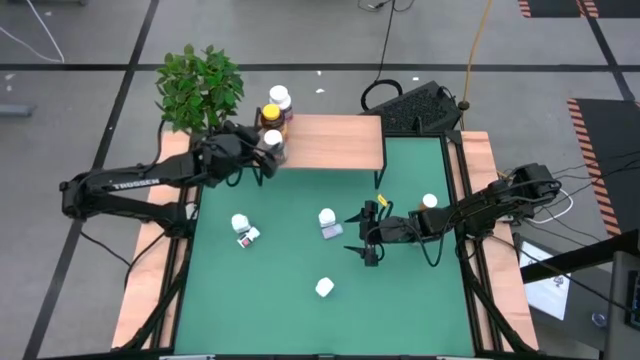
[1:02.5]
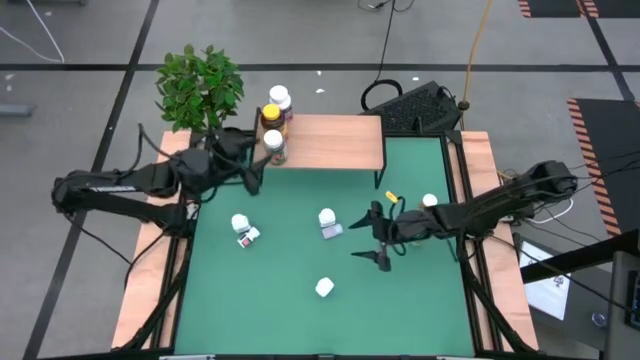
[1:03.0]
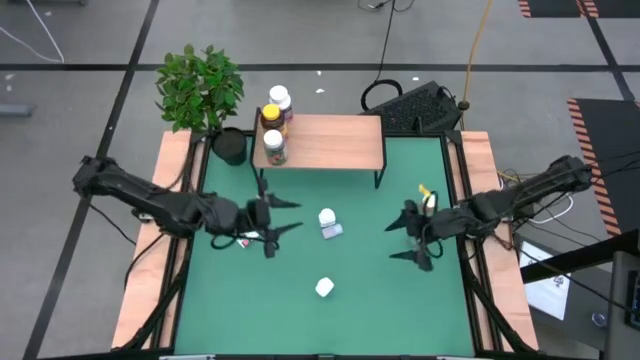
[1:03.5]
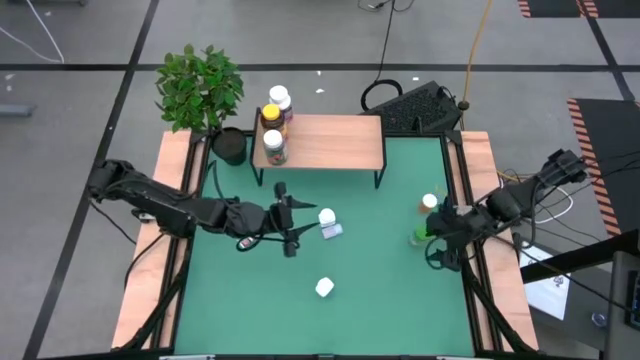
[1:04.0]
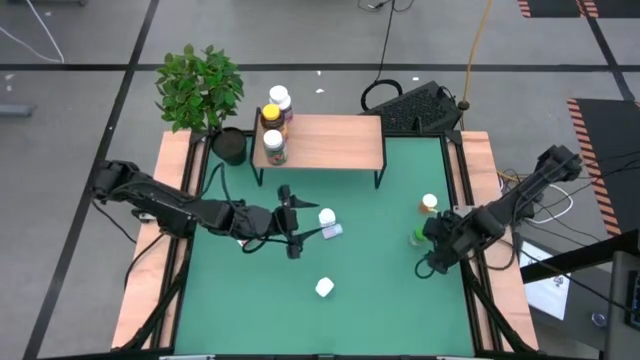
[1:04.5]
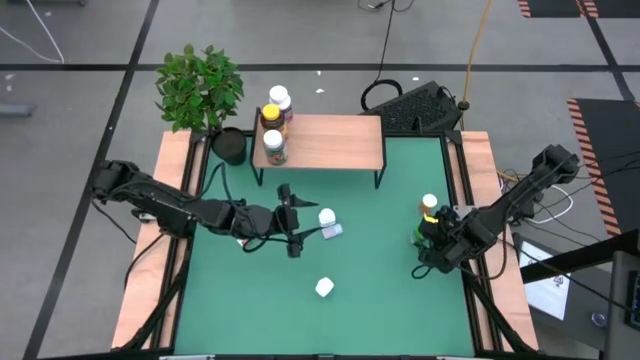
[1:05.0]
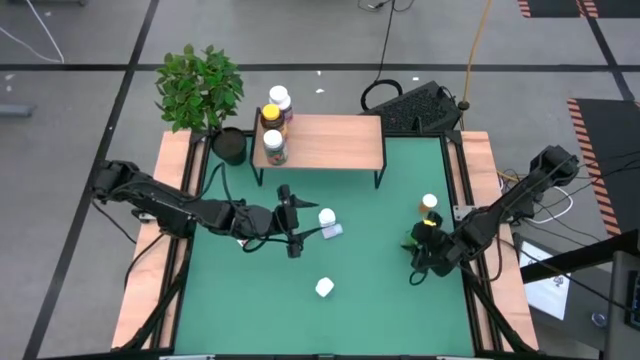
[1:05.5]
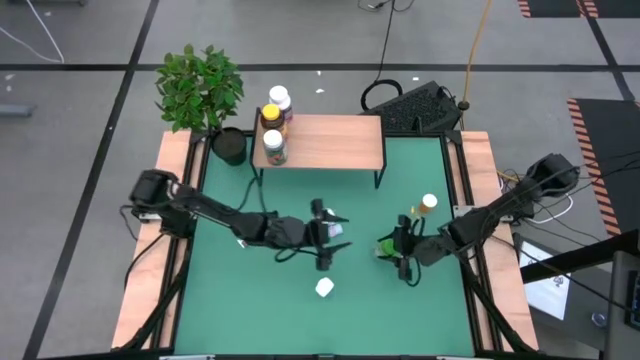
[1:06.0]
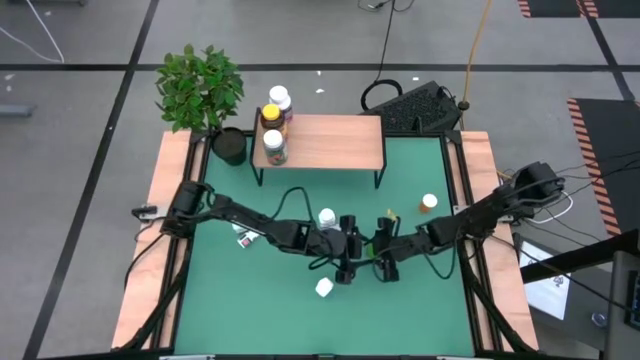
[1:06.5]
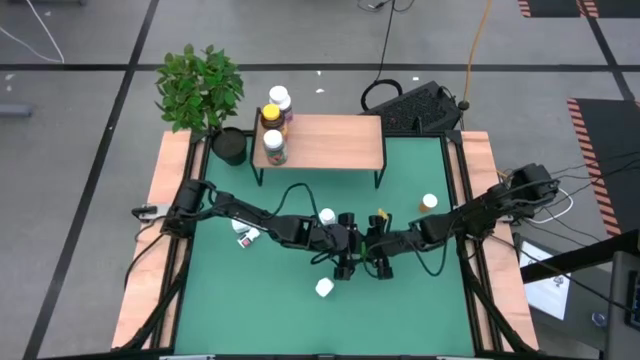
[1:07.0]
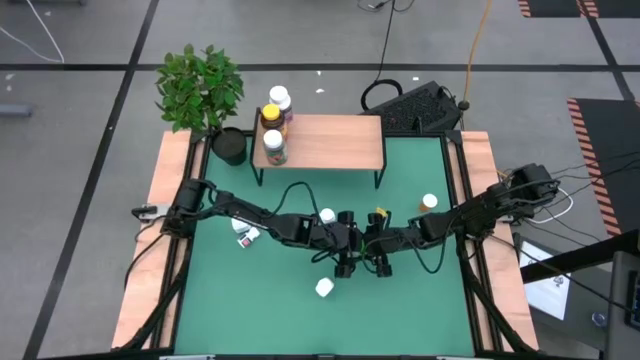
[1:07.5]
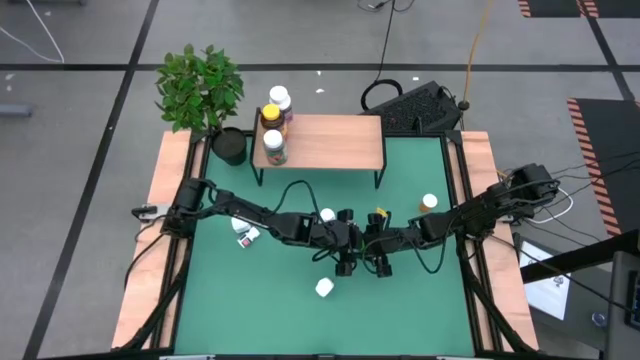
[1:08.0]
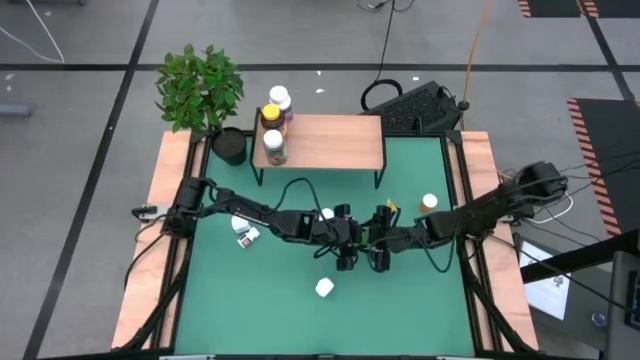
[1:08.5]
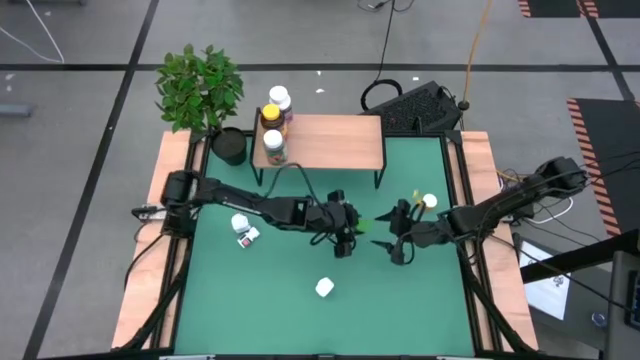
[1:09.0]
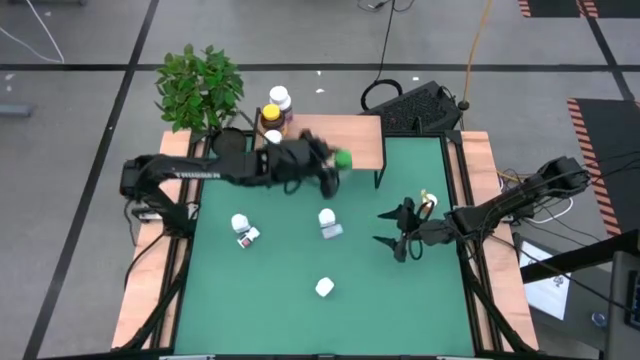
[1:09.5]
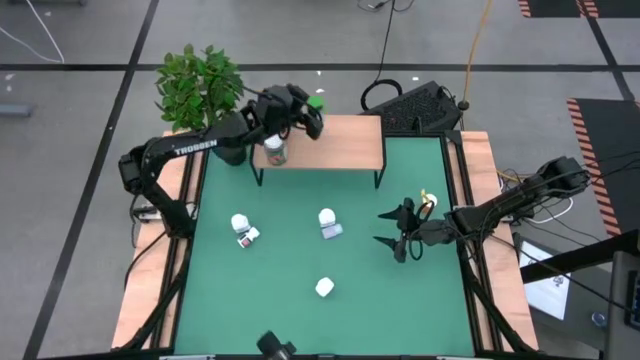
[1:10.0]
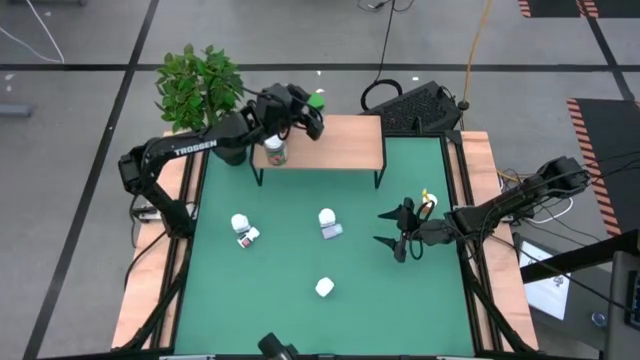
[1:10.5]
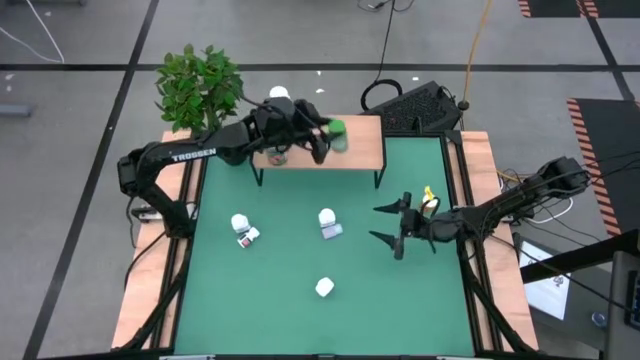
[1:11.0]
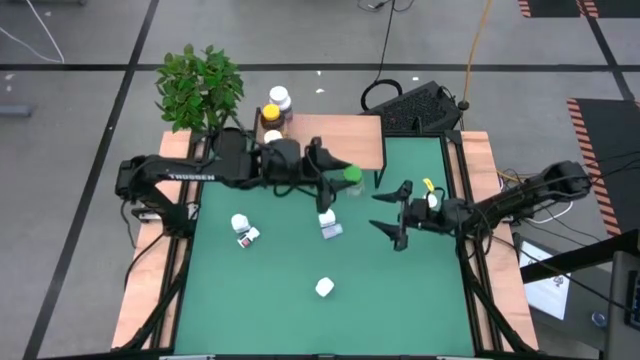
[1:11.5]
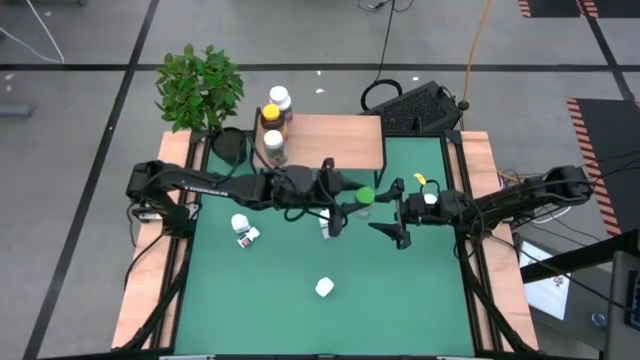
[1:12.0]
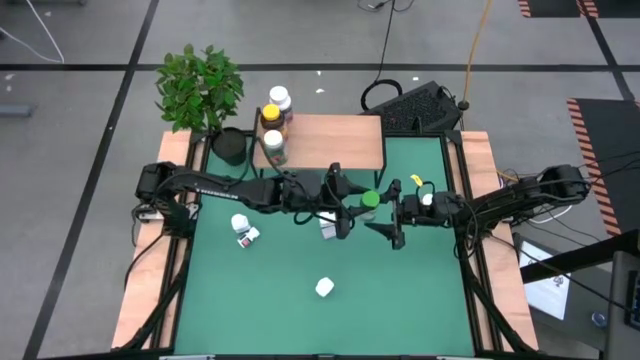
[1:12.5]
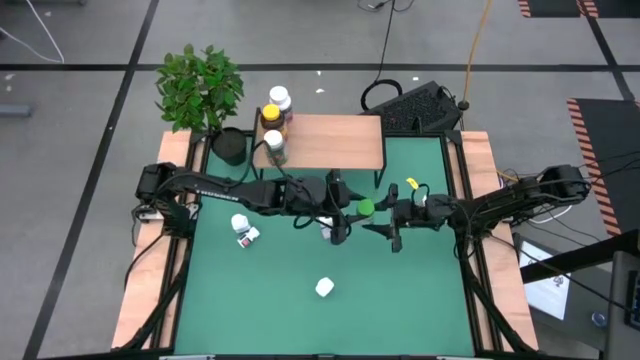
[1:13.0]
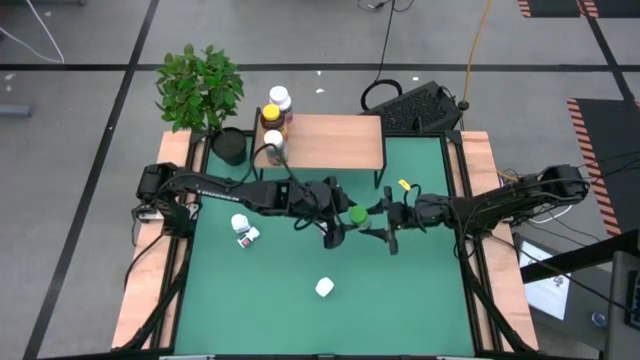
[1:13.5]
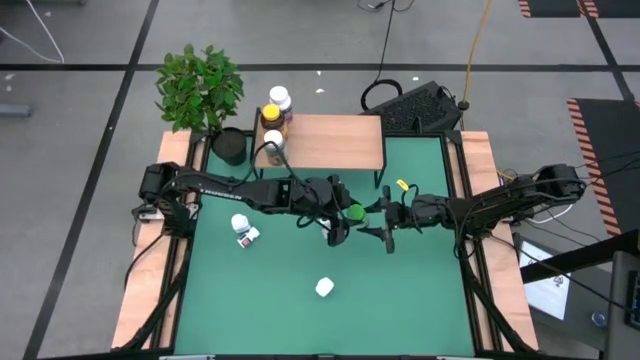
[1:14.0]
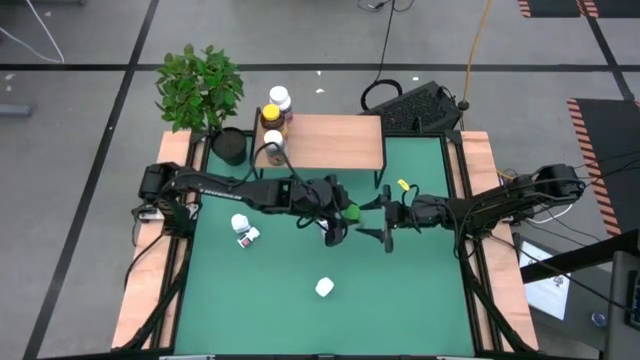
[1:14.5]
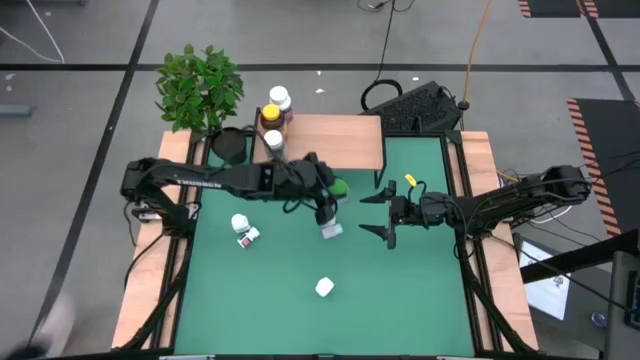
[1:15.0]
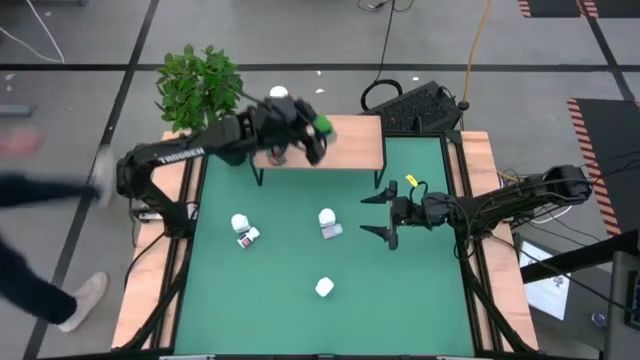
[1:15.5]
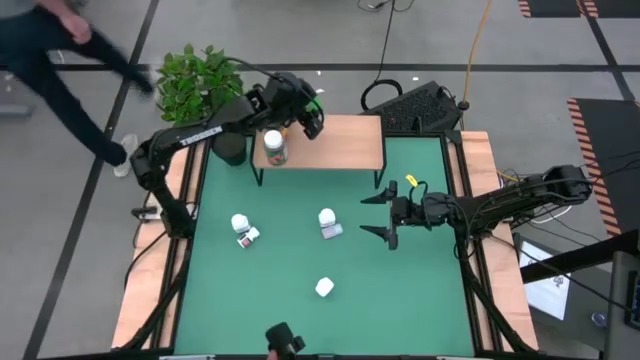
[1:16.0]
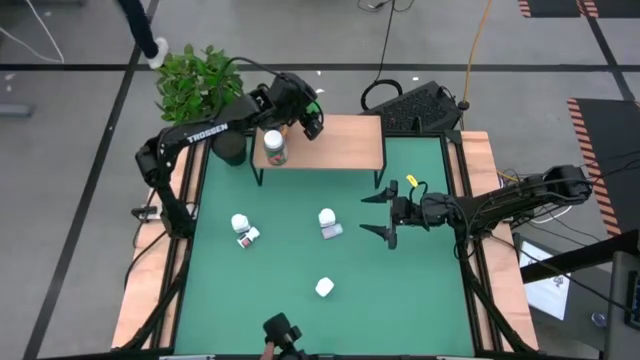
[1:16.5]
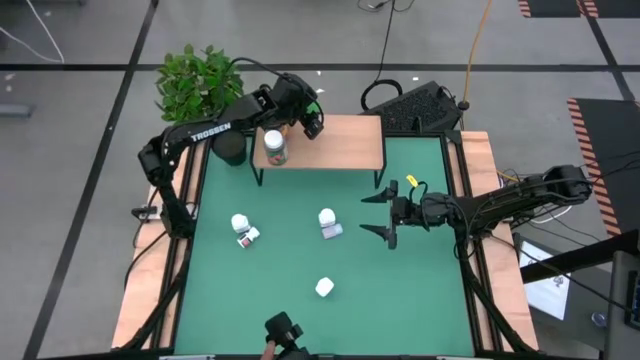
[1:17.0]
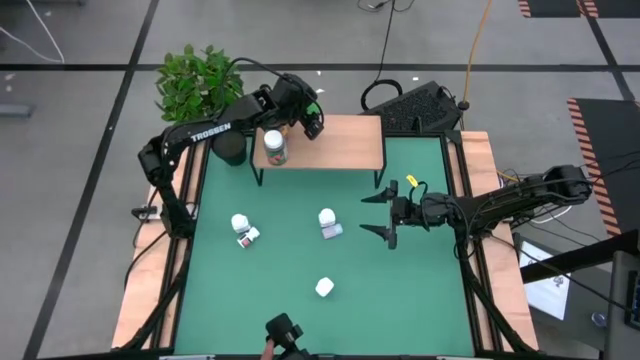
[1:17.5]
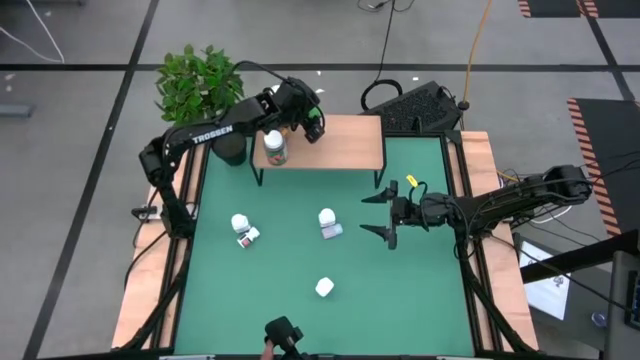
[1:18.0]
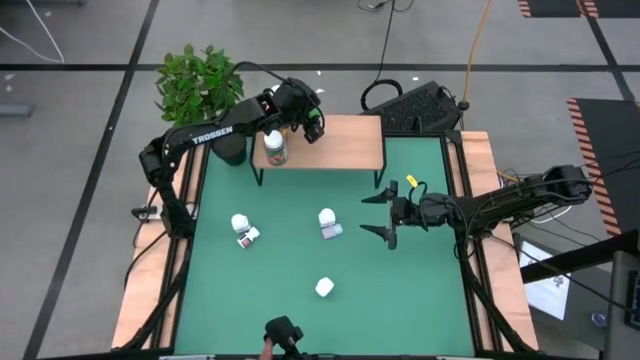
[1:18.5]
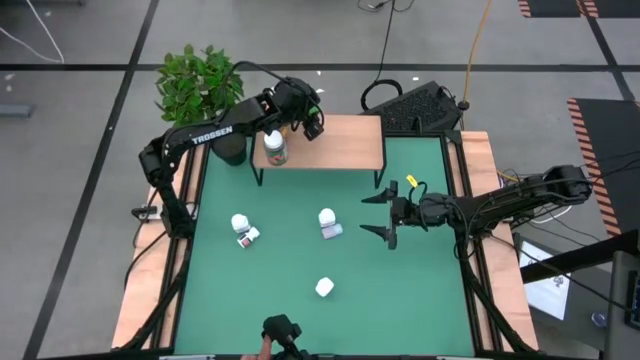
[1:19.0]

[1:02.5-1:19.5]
Task: Pick and place medicine bottles onto shelf by color
Put the small green pill bottle on the shelf

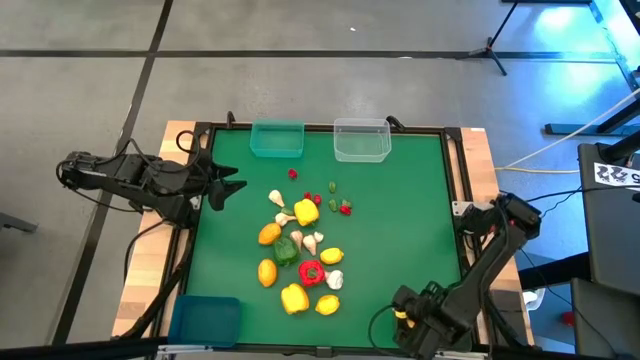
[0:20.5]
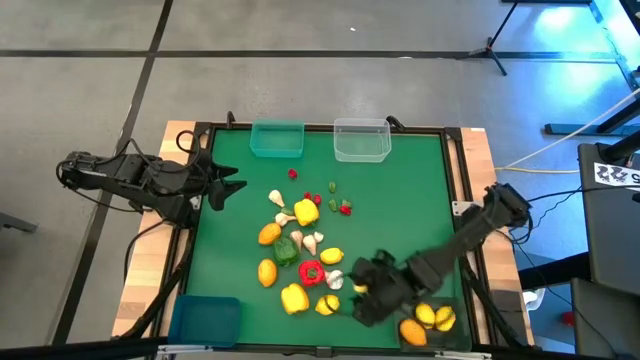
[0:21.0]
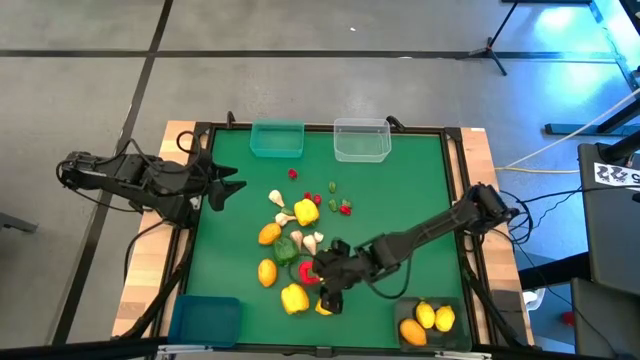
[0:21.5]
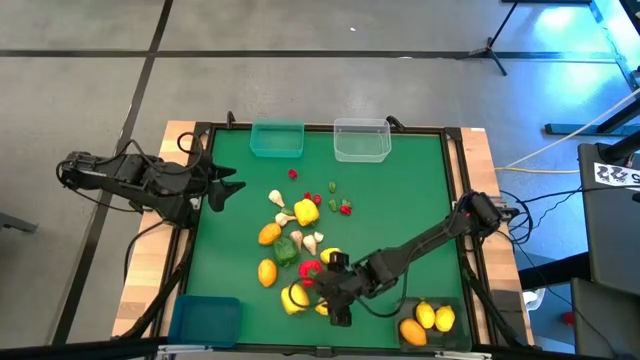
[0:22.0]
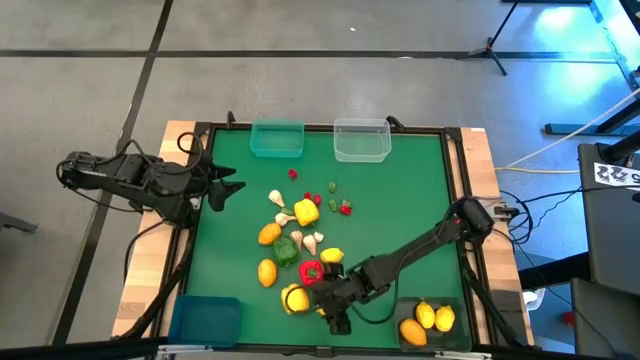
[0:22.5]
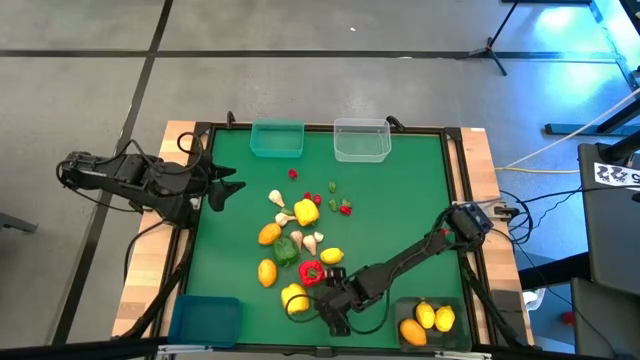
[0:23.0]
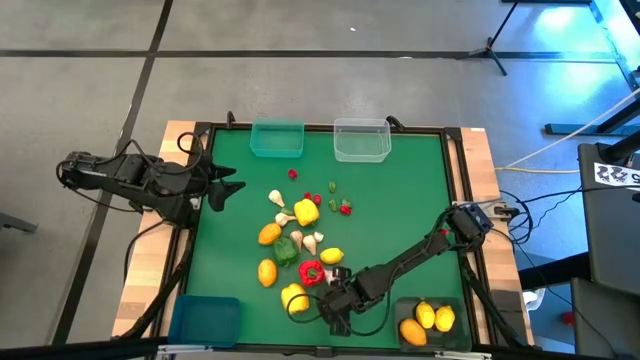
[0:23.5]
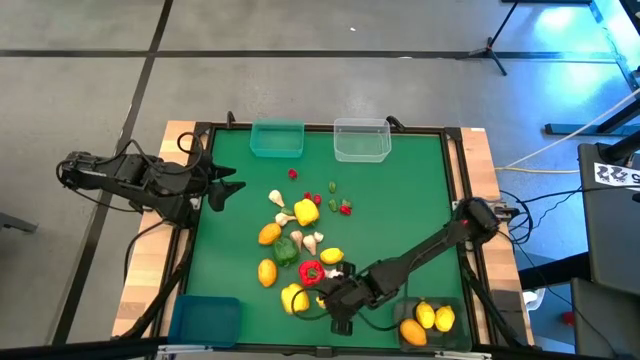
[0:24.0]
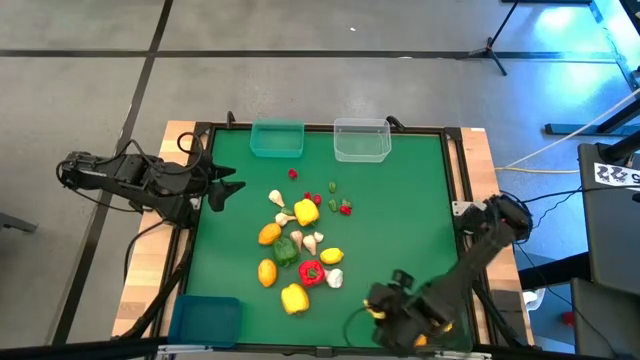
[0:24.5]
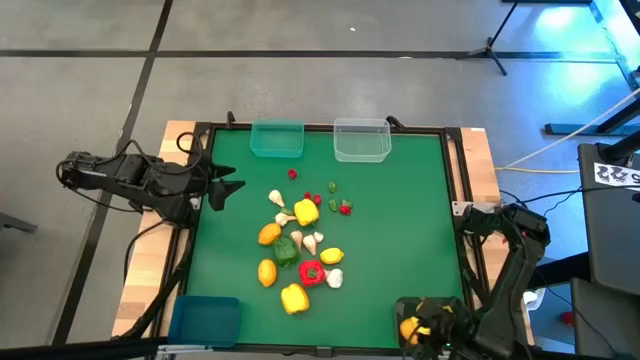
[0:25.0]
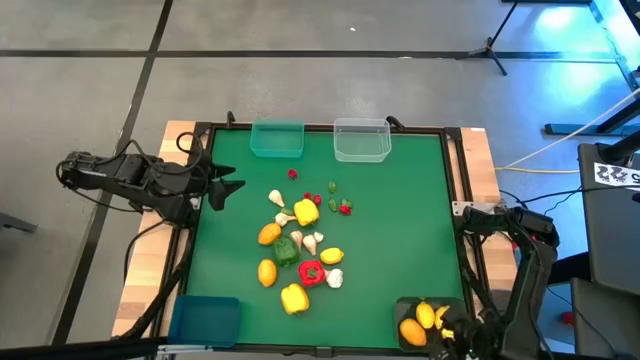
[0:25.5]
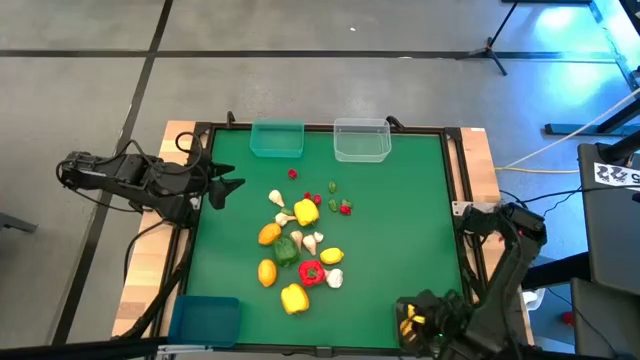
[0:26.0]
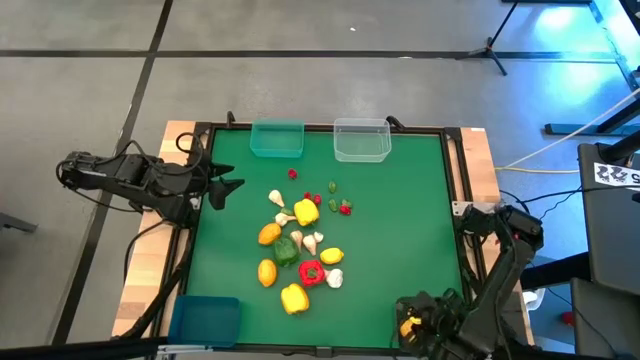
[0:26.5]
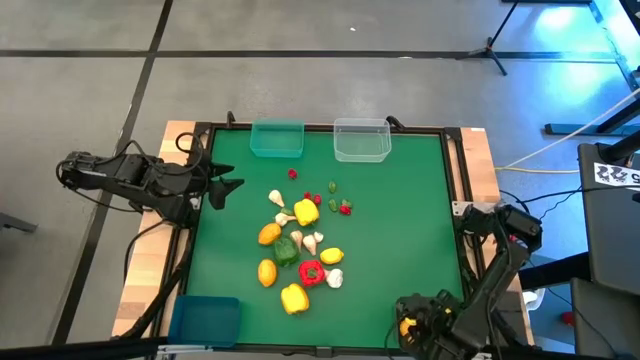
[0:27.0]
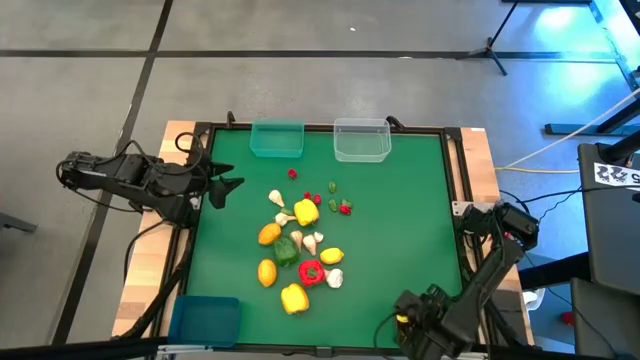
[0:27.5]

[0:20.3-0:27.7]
Task: Sort produce into baskets
Put the lemon into the black bin
